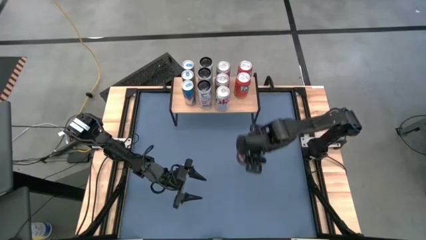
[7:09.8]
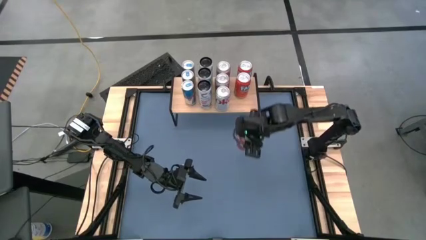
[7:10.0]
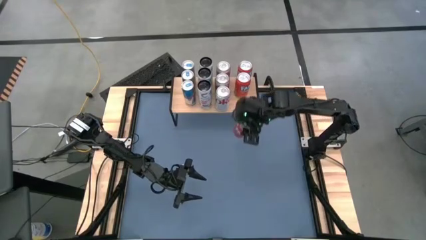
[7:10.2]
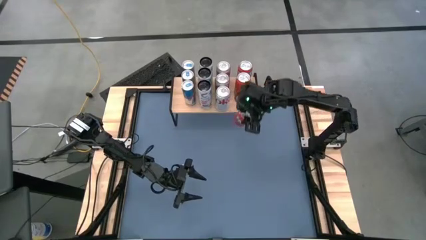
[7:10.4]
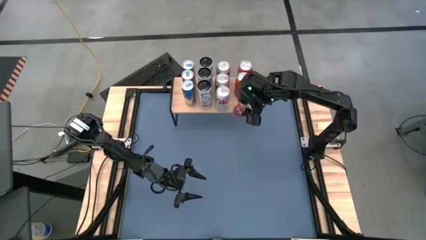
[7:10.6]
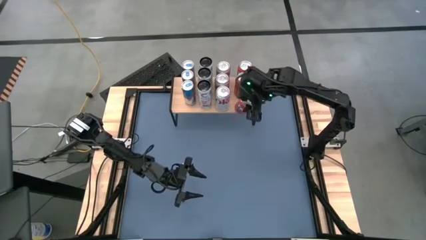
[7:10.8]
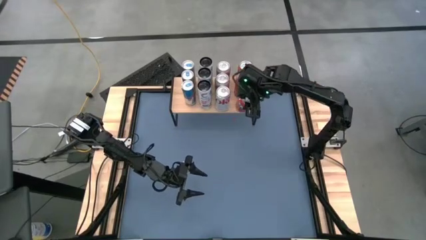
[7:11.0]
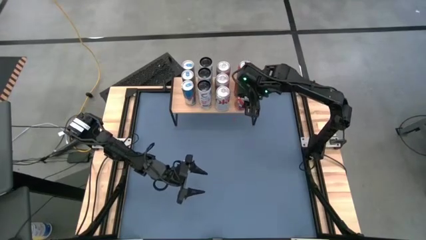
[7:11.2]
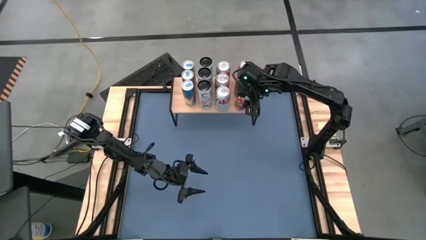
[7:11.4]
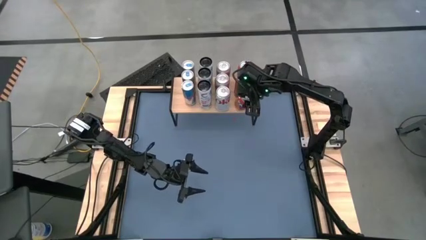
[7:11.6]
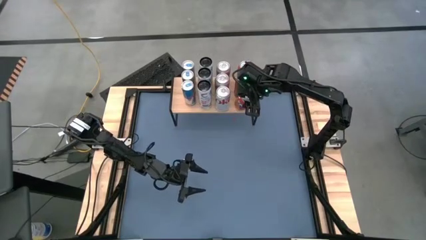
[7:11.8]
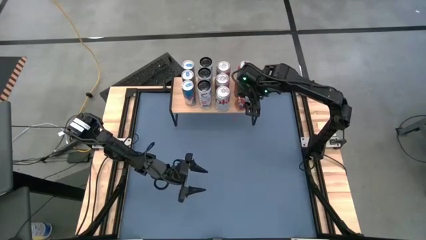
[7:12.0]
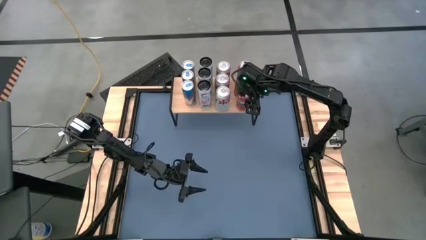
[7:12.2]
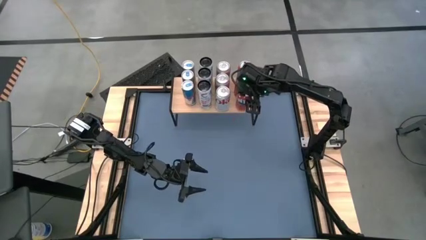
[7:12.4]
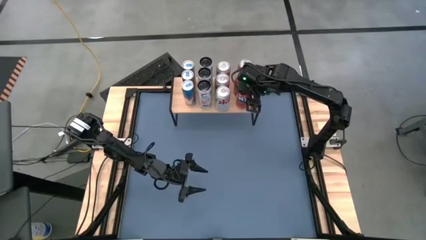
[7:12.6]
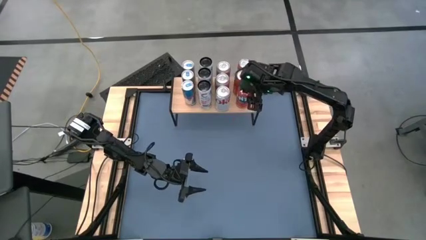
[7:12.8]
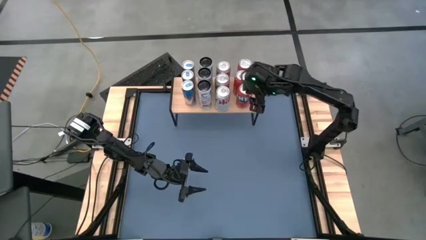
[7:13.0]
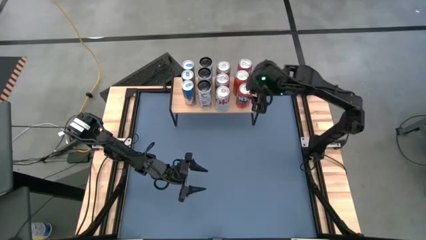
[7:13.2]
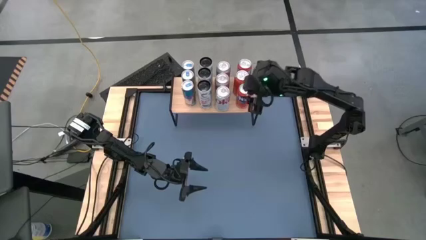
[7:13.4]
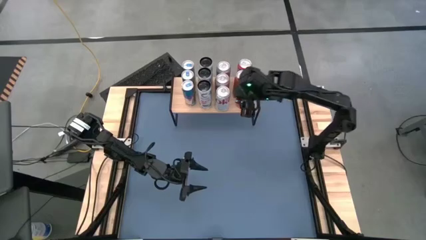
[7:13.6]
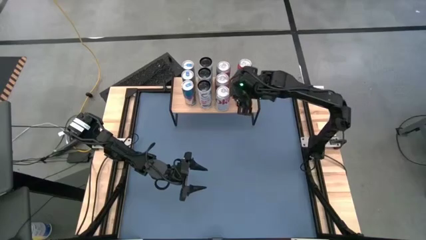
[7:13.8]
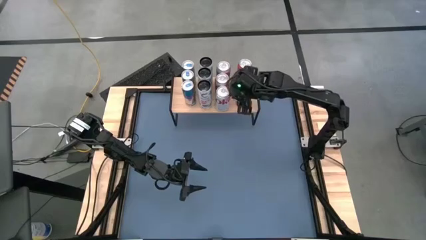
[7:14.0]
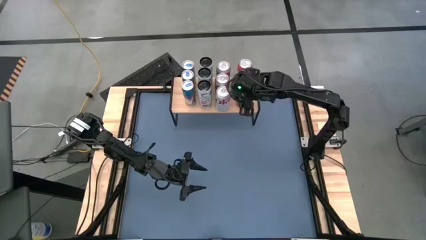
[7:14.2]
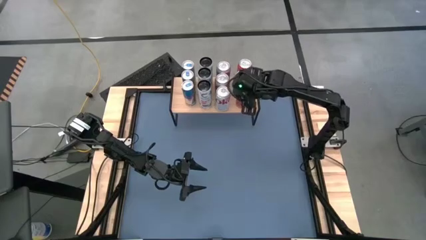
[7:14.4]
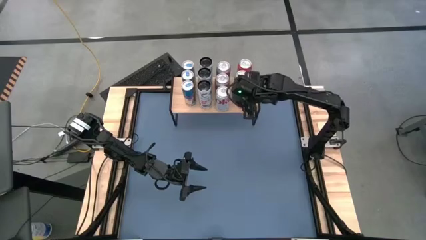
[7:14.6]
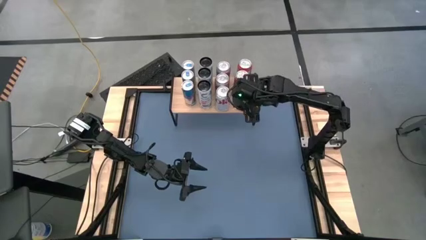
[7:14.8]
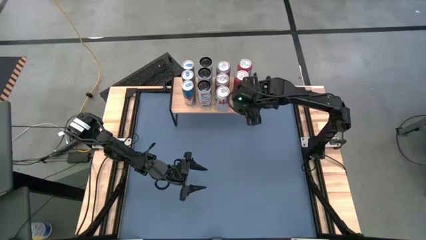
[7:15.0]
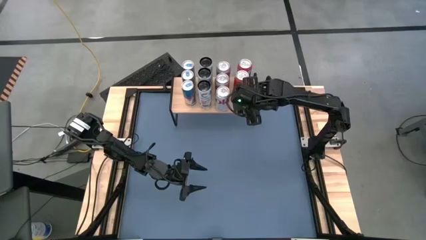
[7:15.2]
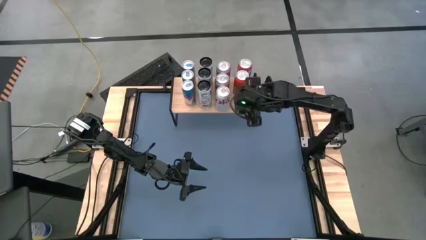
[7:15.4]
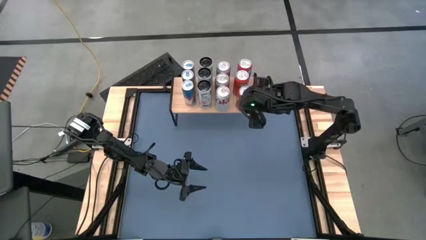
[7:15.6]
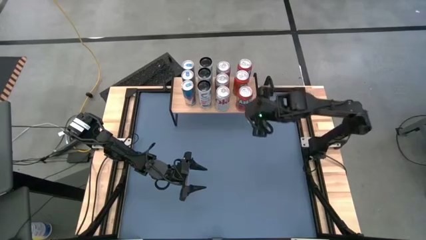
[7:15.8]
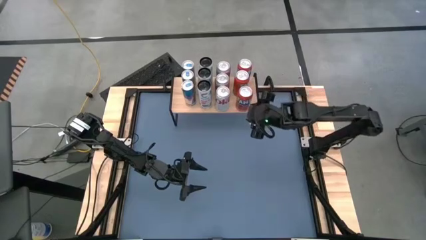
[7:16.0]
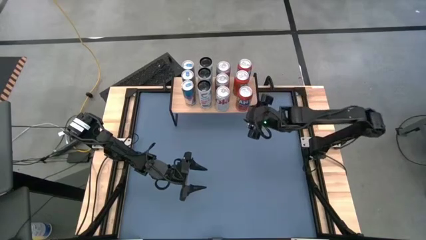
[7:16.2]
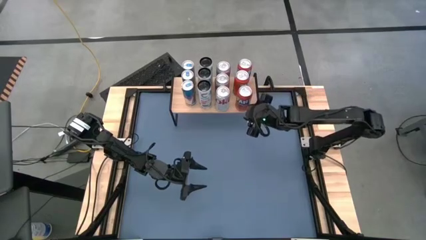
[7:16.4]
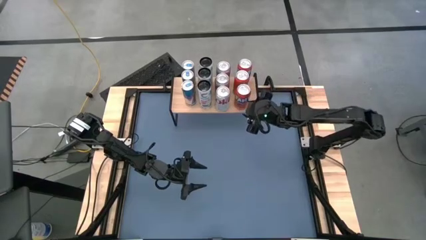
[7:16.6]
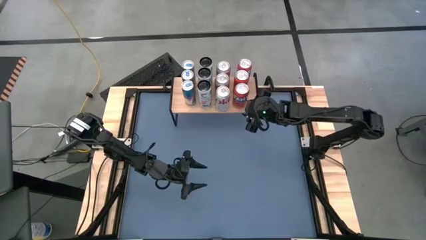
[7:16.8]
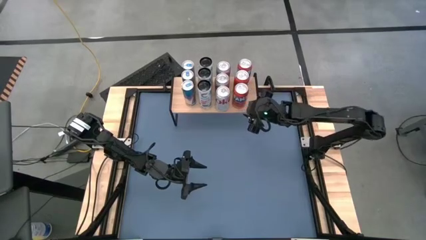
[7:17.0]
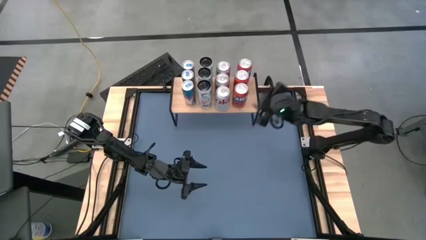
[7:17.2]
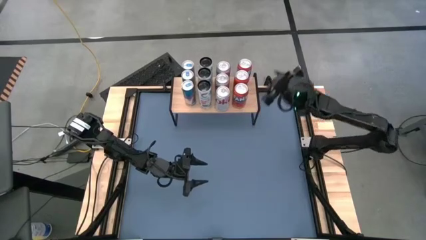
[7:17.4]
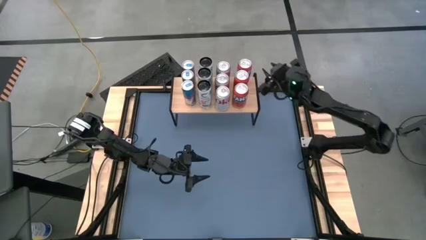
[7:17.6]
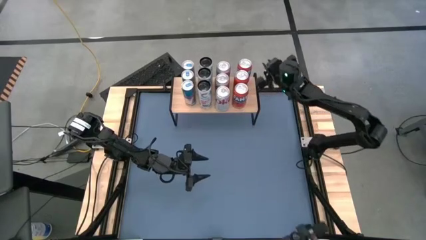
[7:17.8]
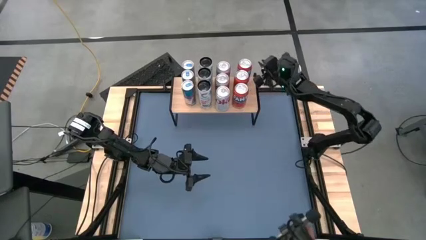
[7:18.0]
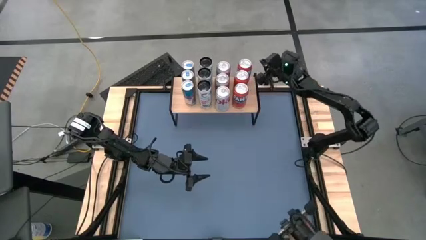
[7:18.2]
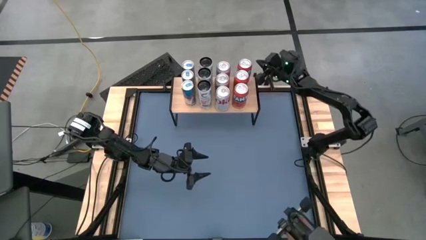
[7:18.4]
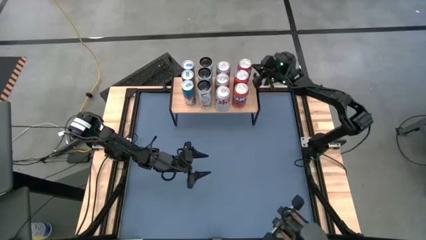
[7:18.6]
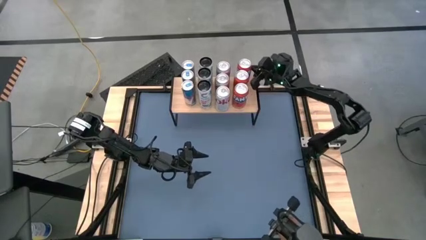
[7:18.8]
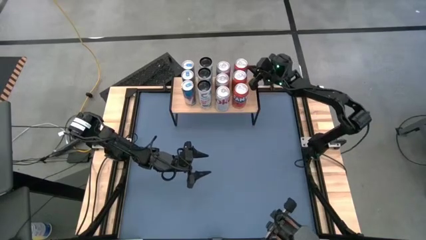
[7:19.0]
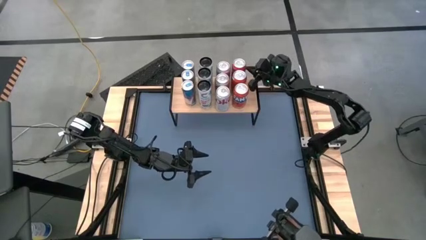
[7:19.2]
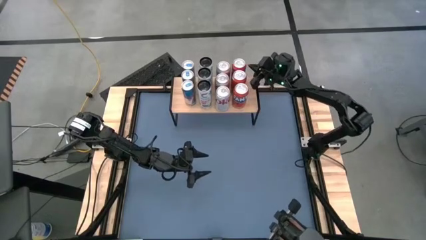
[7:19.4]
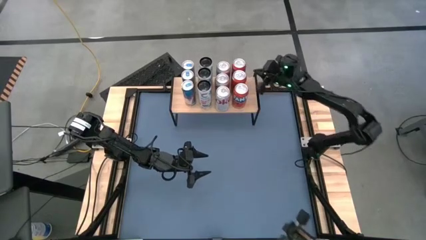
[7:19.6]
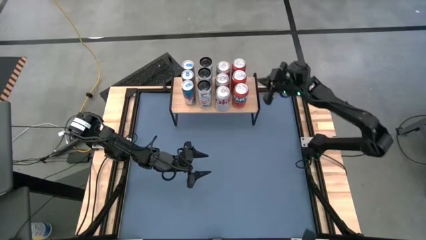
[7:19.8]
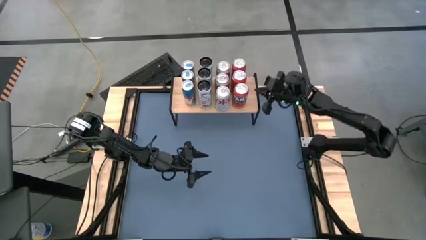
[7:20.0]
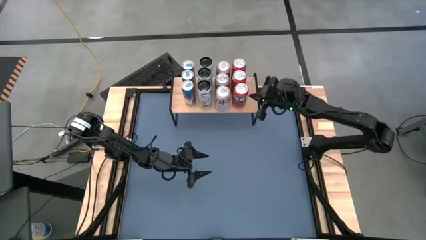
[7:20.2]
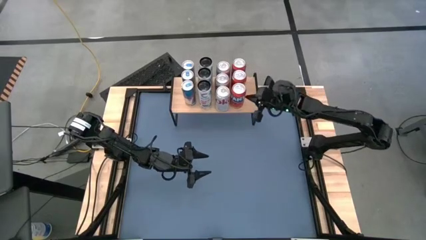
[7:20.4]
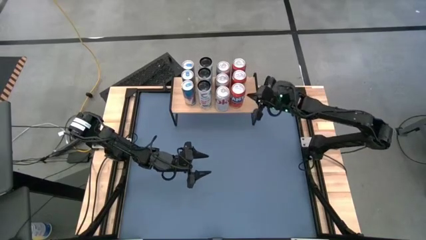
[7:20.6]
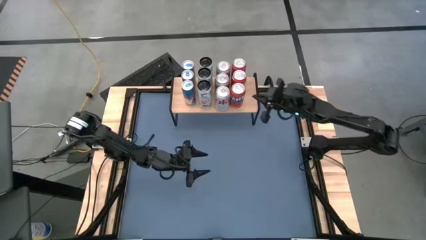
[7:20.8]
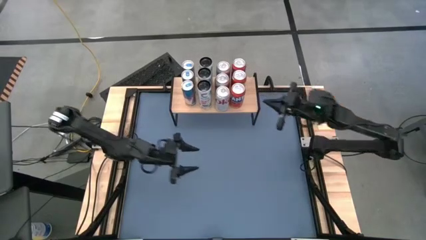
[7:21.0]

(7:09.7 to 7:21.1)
Task: Place canned beverage on shelf
Put the orange soda can on the shelf aligned with the other orange soda can

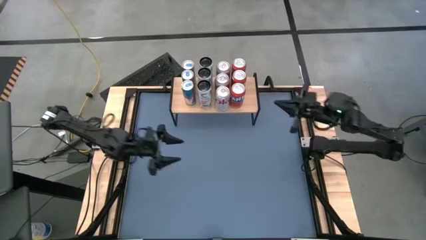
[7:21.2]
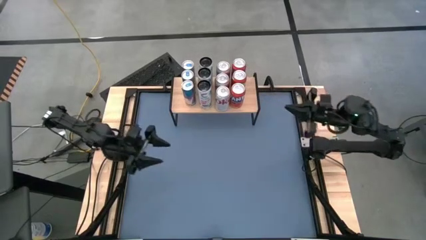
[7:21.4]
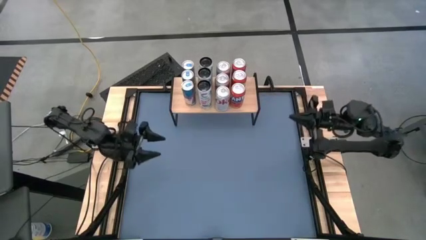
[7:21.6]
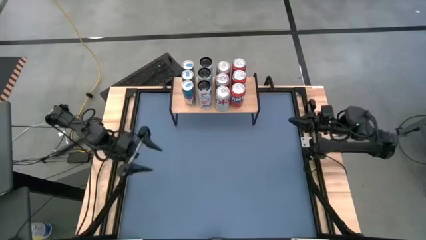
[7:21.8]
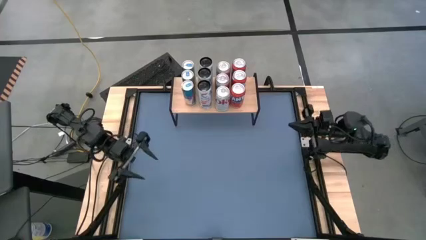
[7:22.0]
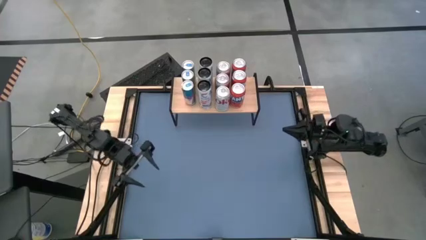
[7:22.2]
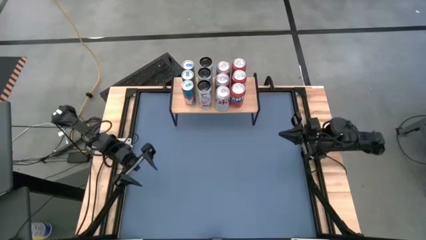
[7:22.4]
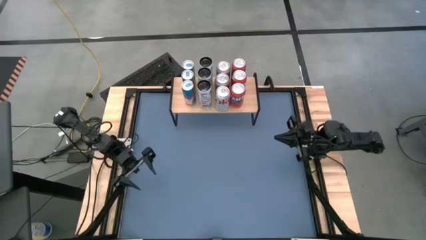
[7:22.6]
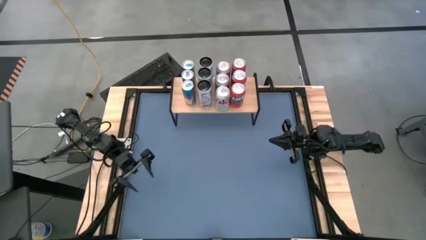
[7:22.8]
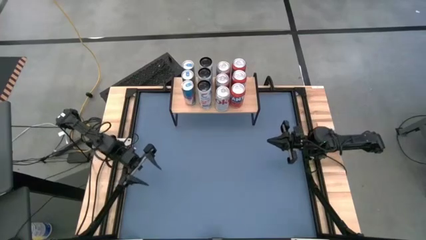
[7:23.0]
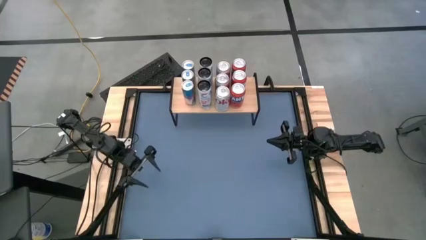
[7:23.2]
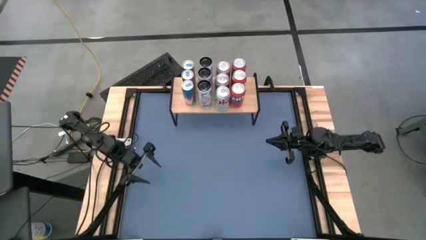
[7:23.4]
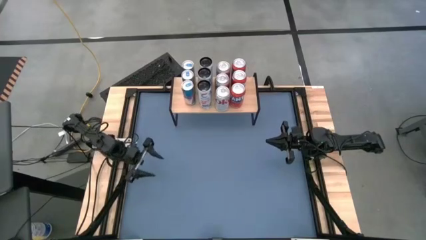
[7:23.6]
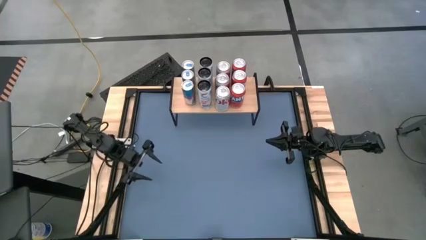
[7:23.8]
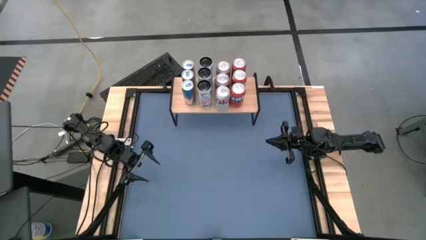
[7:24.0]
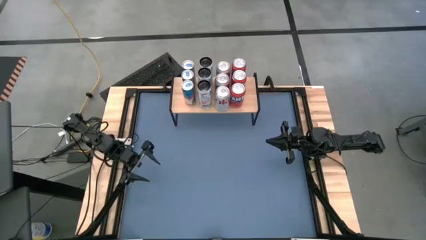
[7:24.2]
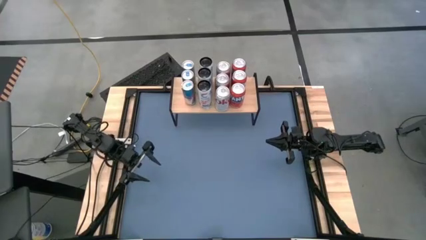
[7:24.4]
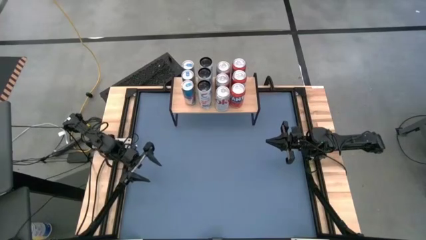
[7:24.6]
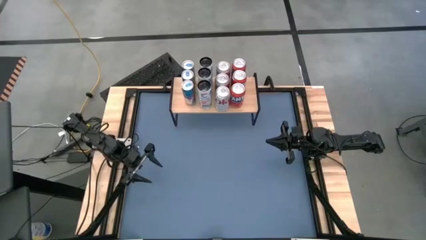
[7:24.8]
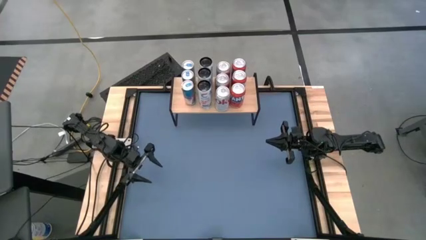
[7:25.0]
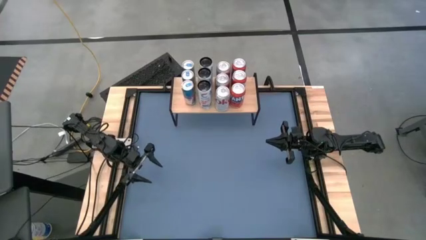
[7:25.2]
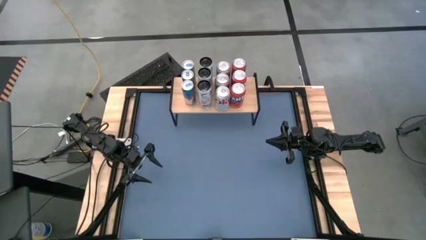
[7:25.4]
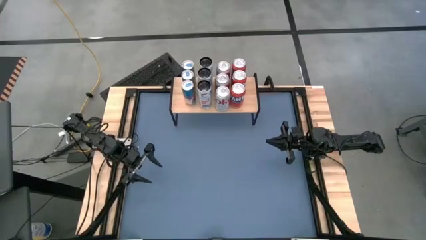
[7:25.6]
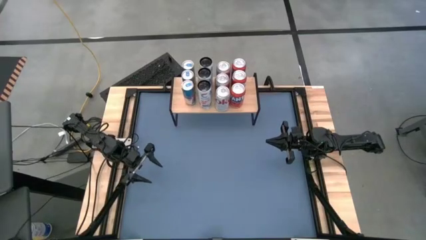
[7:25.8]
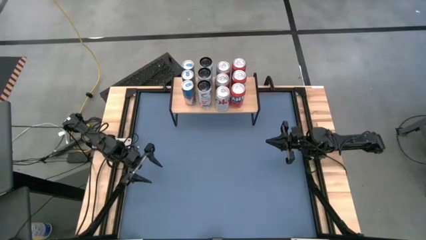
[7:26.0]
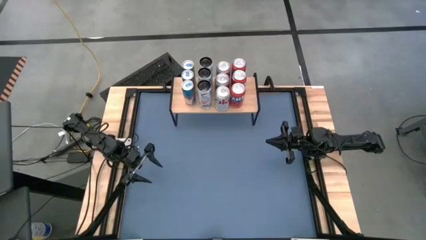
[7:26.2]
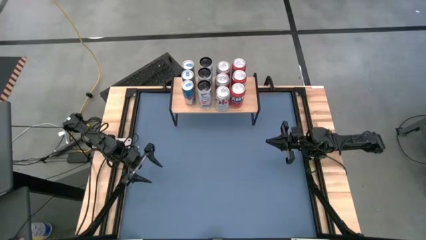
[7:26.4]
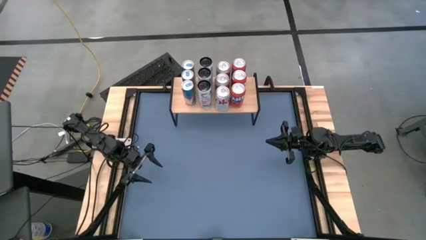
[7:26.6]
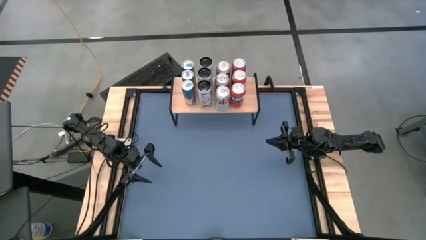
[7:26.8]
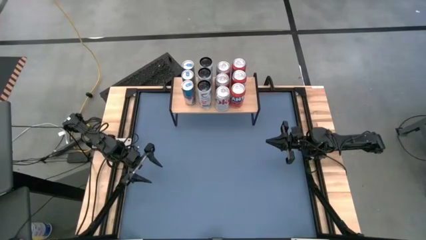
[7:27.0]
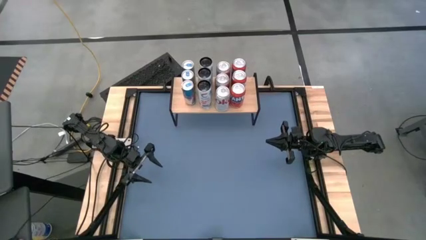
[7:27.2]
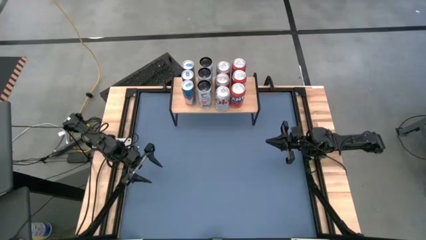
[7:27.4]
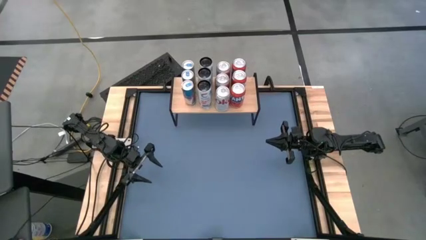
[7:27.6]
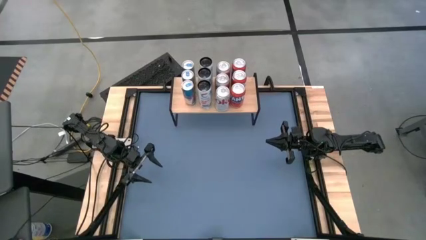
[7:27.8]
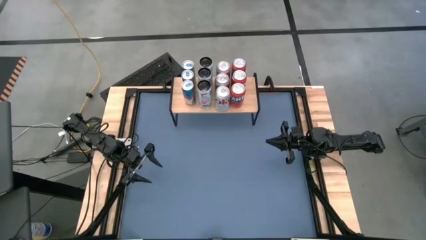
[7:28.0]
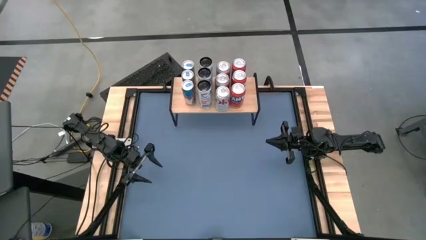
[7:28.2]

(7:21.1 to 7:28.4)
Return to Home Position
